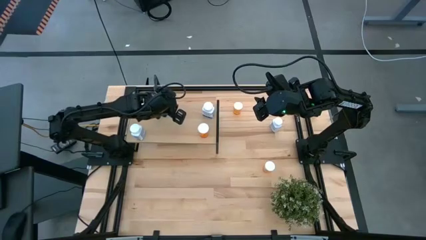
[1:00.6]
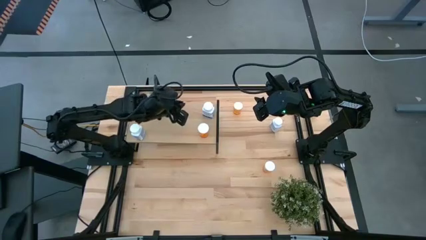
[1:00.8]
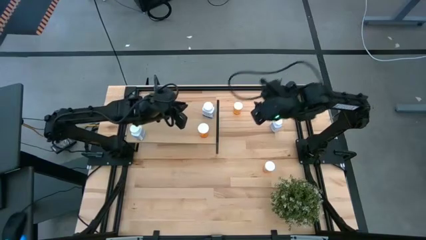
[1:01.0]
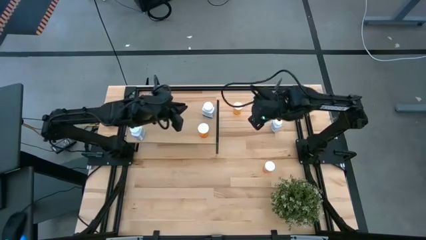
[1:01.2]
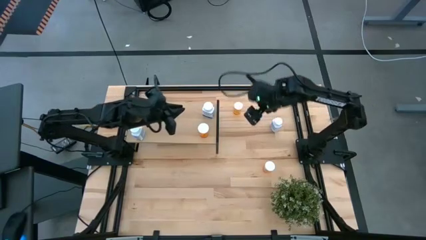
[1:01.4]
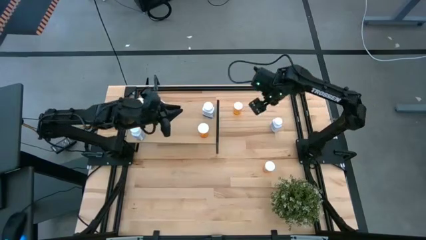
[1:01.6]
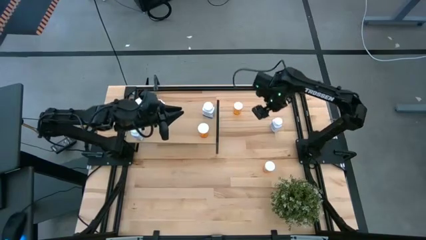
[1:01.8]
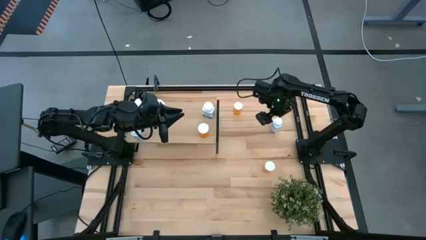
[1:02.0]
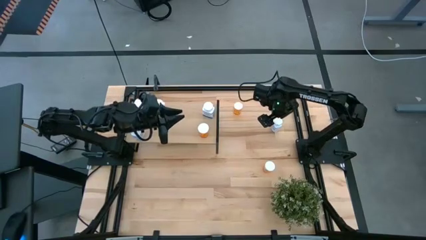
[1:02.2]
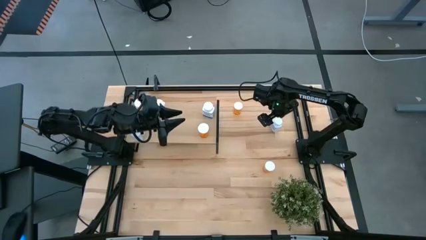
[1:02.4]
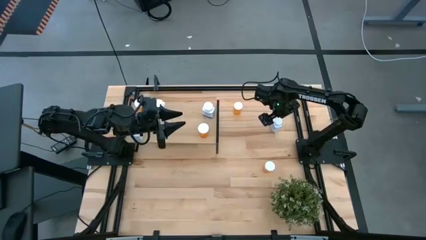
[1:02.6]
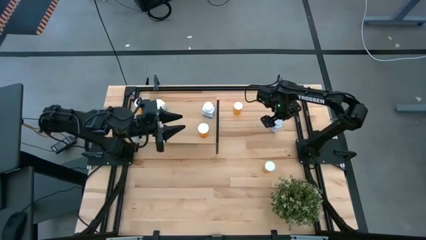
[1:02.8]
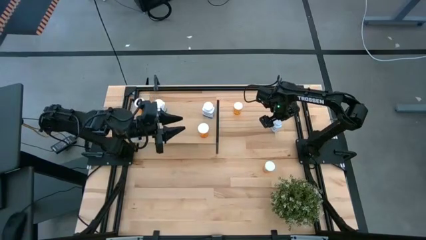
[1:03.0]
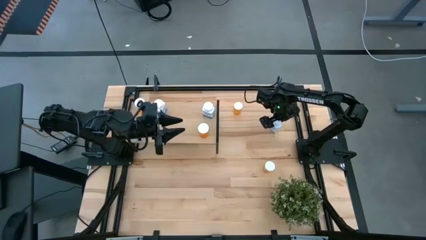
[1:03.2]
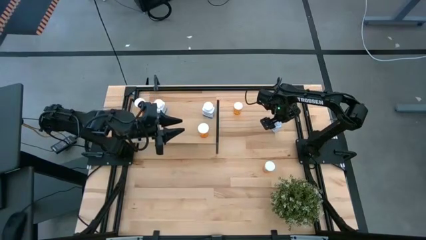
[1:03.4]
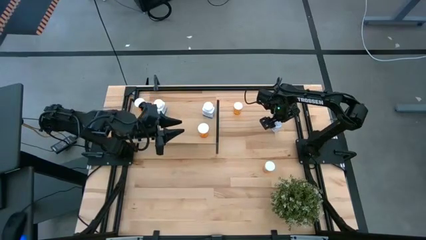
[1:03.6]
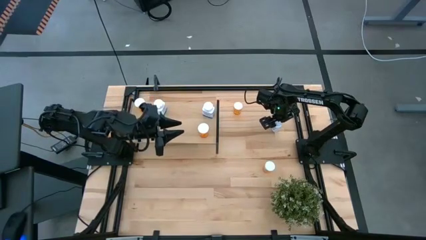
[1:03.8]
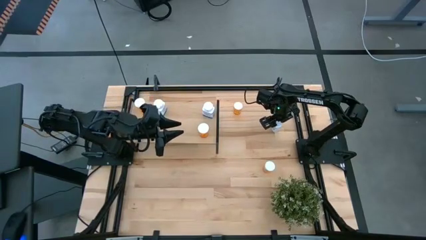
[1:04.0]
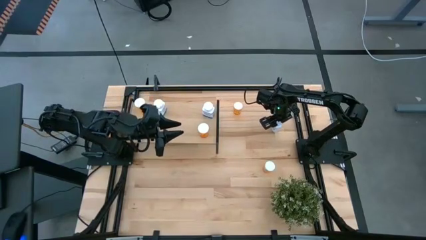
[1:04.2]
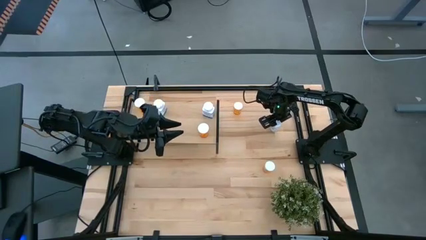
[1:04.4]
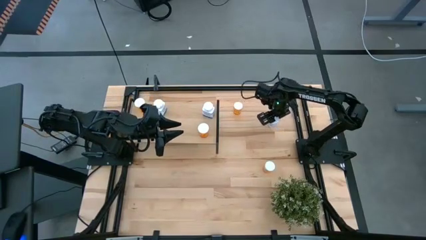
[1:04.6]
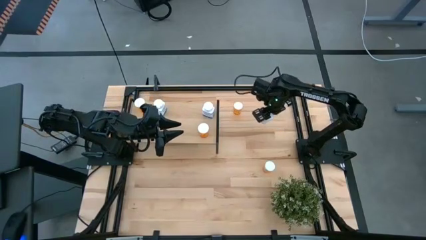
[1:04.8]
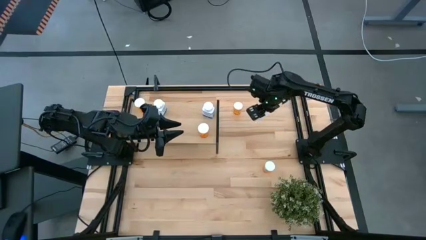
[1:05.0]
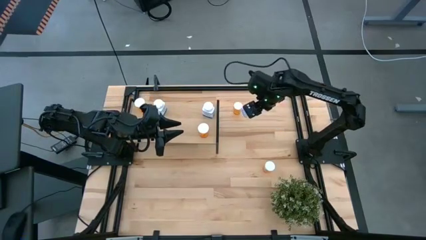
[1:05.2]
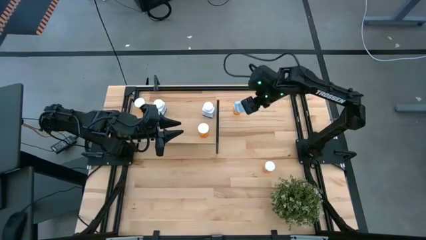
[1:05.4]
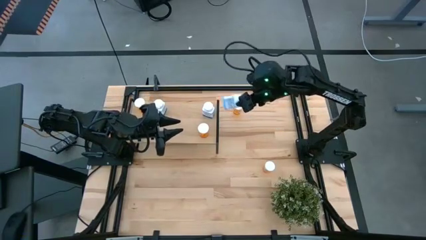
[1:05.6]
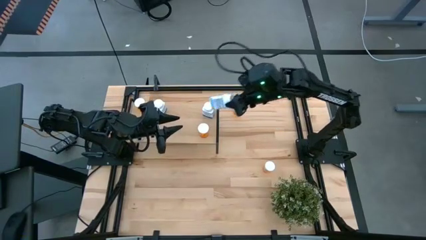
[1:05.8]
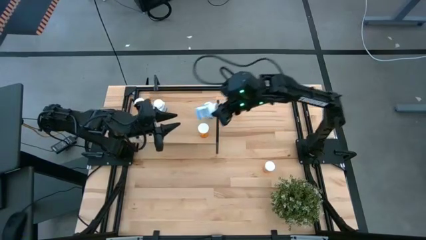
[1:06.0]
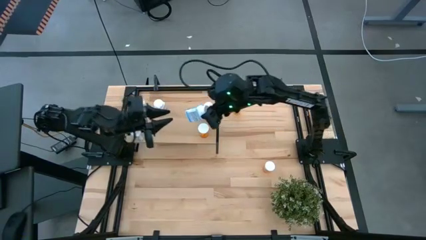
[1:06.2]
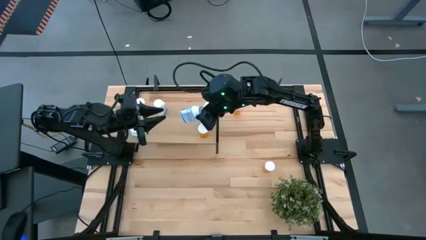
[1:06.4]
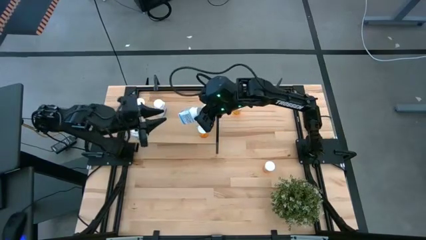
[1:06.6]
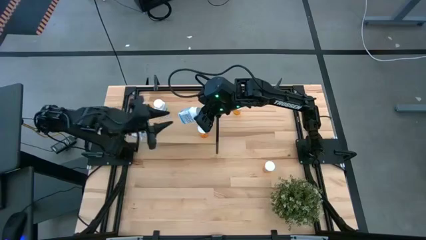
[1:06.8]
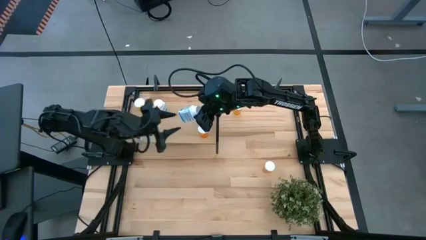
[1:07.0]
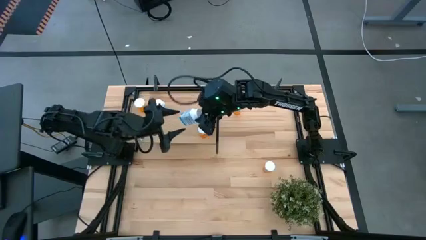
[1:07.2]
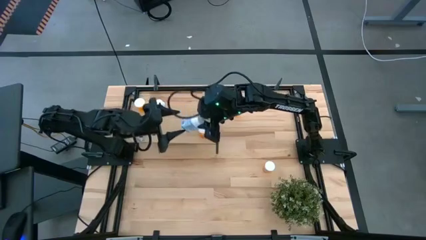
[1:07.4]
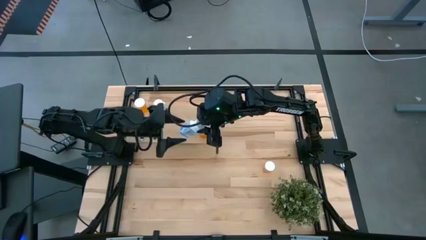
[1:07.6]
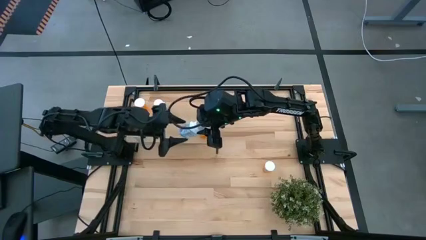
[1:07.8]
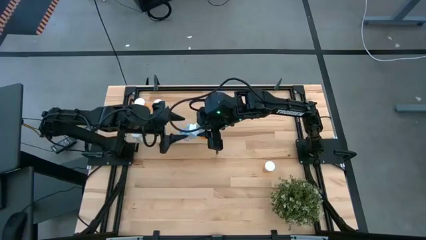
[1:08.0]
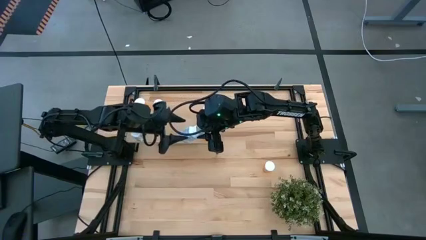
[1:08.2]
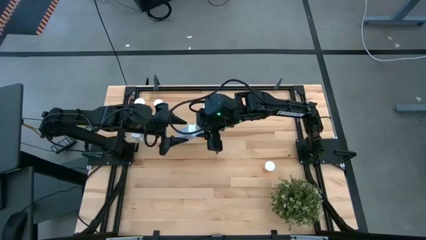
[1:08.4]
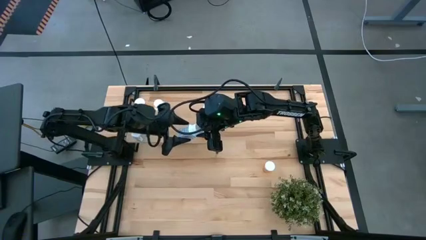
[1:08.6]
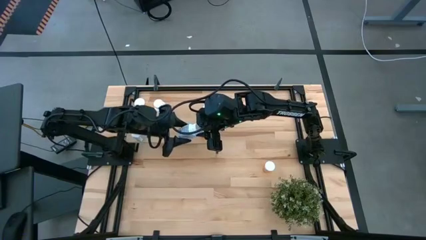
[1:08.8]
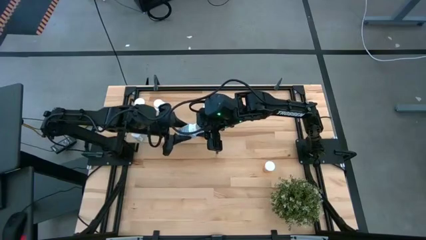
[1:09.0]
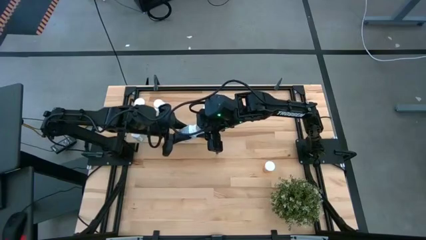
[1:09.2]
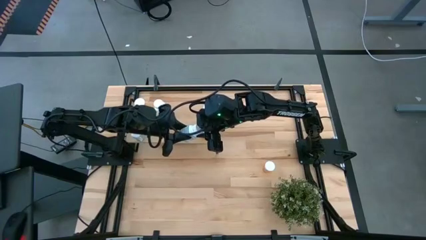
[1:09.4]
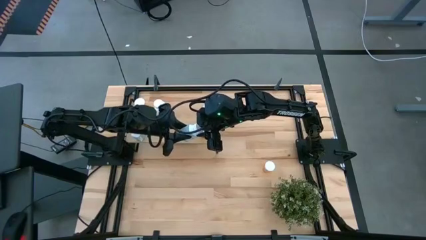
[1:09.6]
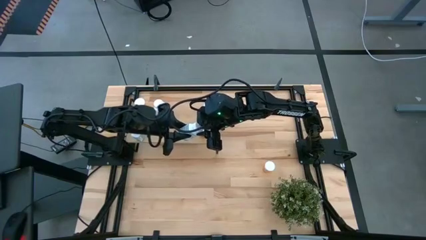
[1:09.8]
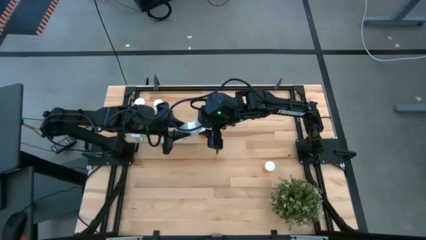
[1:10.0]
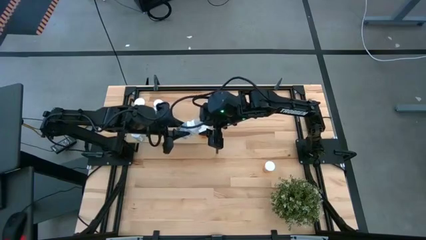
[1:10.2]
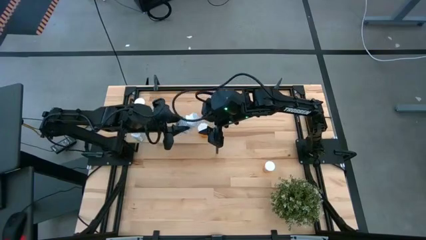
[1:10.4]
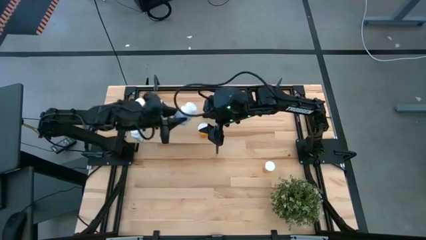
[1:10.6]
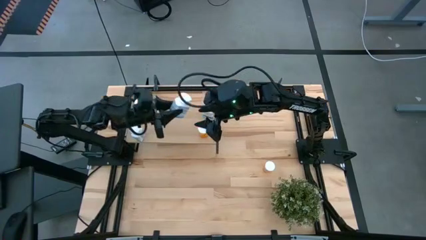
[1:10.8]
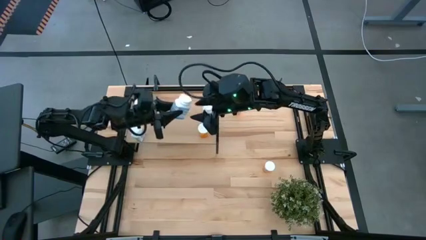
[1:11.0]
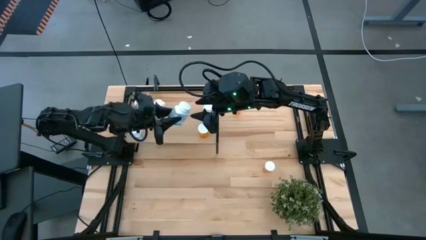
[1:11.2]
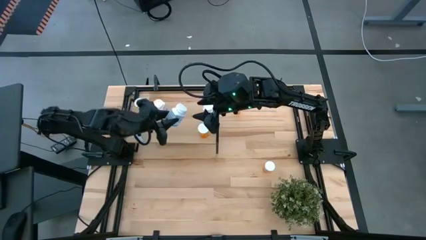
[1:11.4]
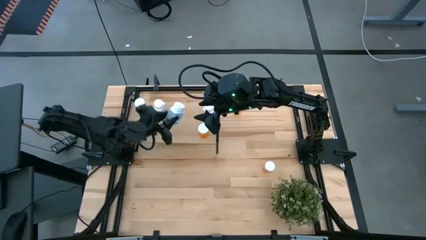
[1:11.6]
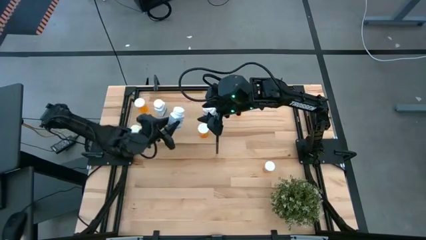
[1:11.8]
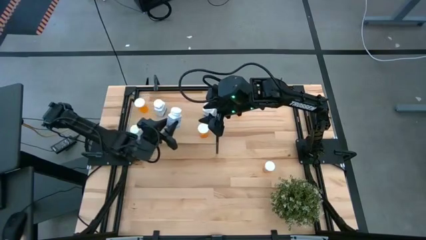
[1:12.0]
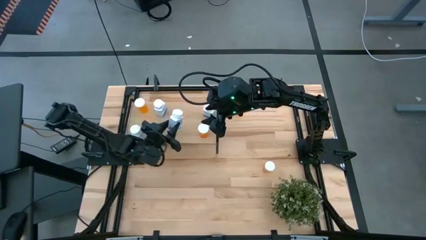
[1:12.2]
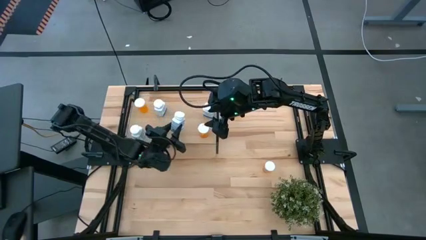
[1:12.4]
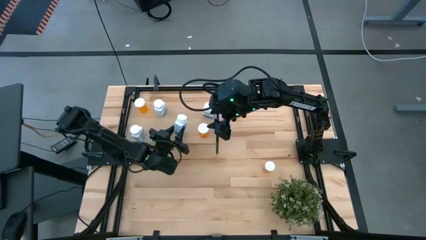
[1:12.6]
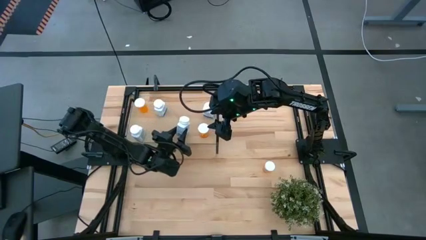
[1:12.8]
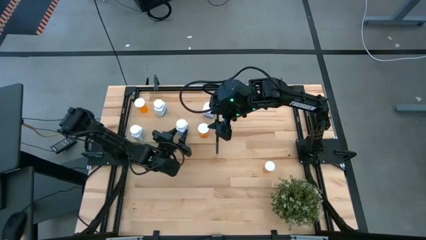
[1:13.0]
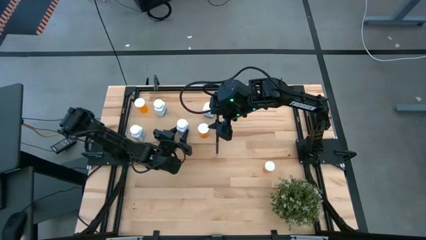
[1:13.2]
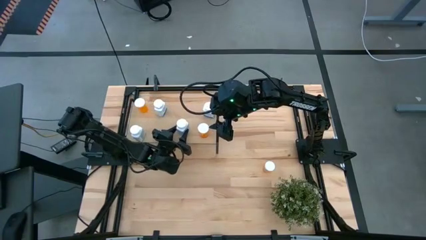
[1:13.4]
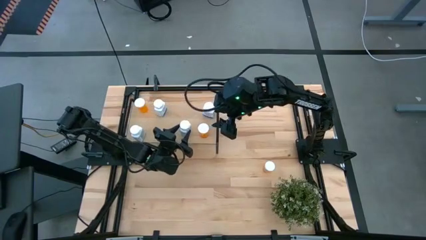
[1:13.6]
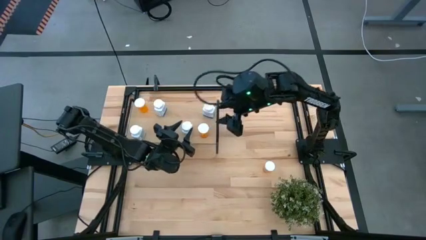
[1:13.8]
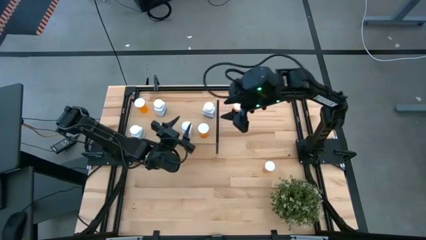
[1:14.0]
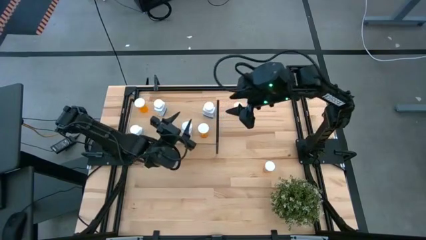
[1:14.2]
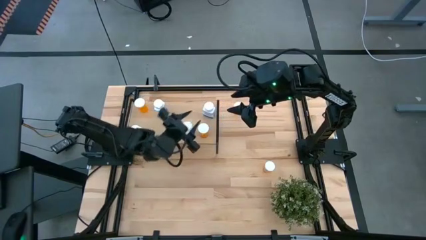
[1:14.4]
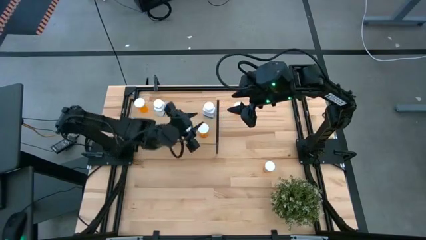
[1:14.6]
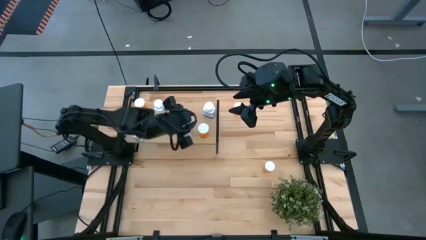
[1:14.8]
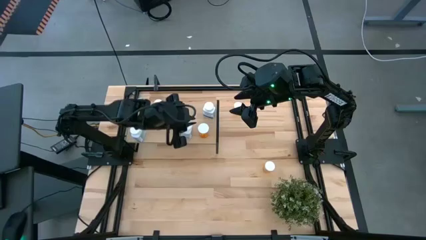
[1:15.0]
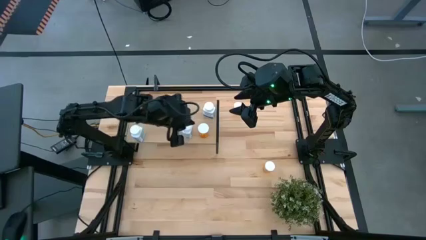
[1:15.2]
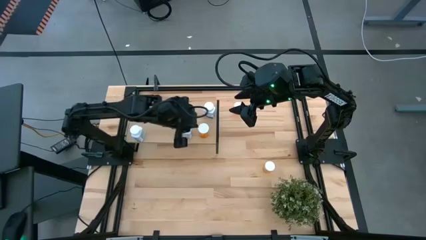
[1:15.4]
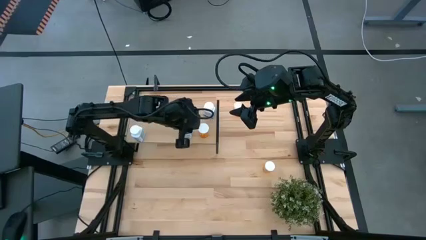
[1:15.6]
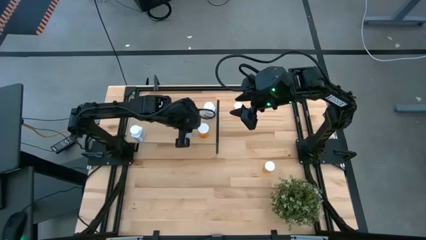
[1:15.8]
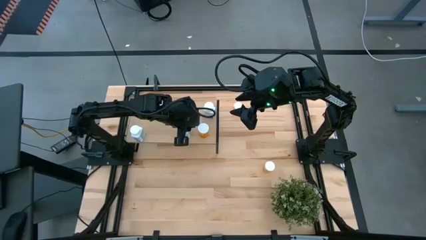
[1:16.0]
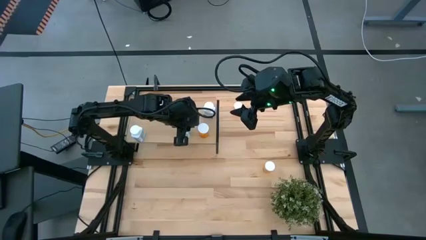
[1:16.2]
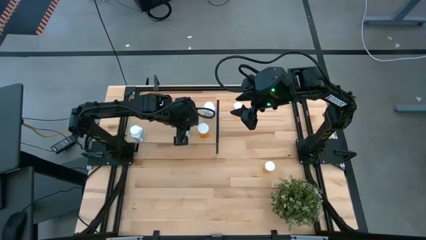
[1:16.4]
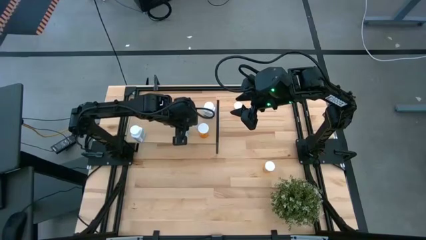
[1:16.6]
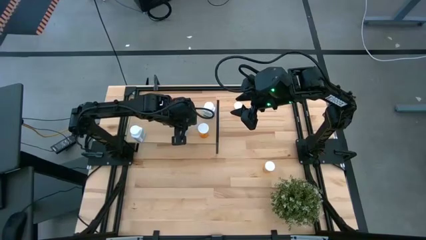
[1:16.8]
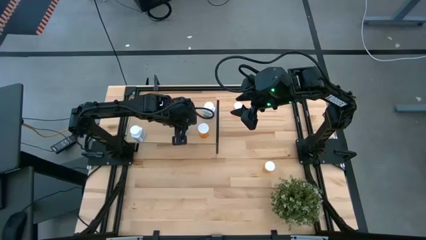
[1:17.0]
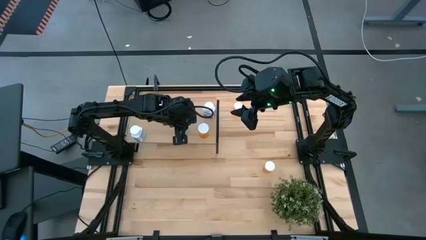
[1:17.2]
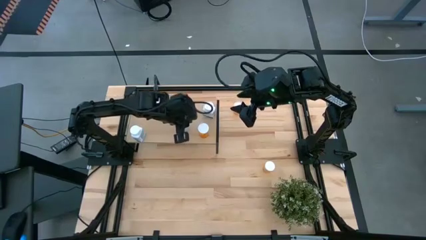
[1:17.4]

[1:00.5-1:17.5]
Task: Pick and place medicine bottles onto shelf by color
Put the white pill bottle on the shelf

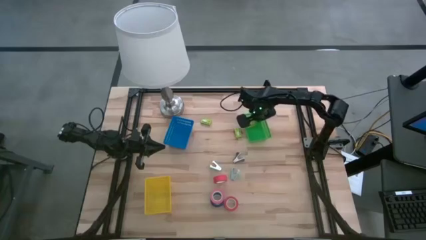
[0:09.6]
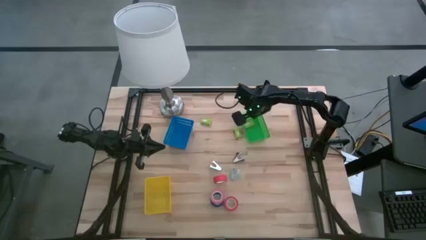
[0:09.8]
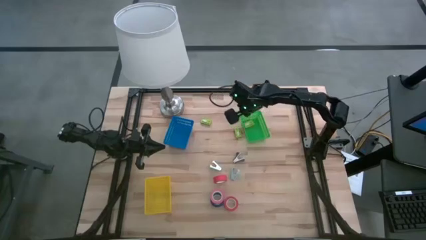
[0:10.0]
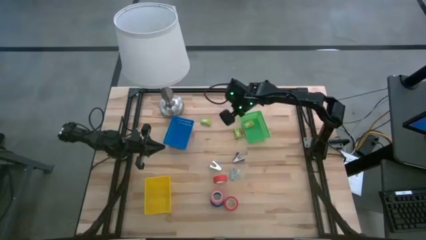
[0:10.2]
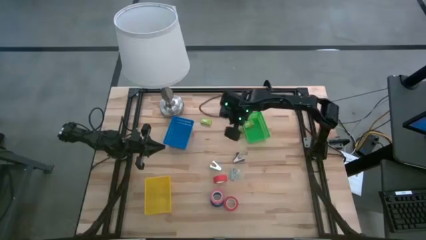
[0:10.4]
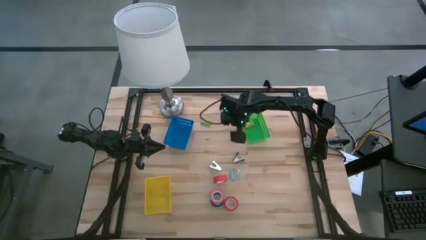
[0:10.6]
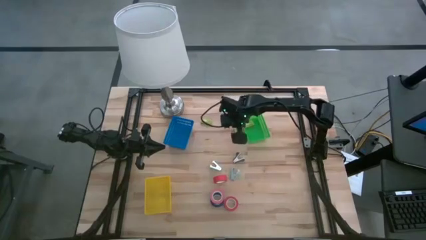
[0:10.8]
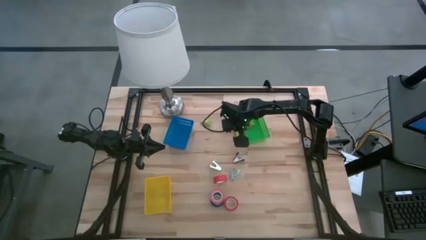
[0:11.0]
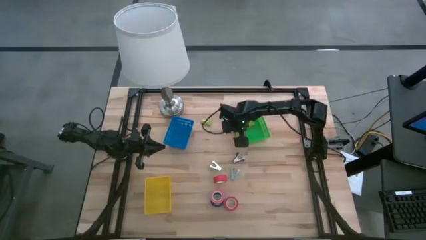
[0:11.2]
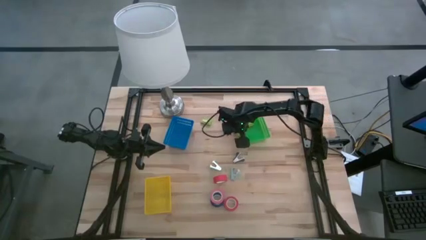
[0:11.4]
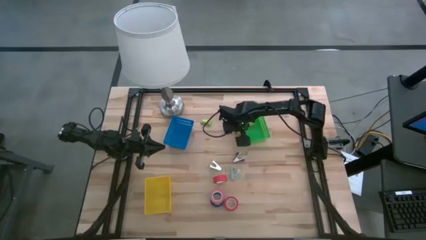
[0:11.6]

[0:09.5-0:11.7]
Task: Pick and place Stapler, Stapler remover, tape
Put the right green staple box into the green bin
